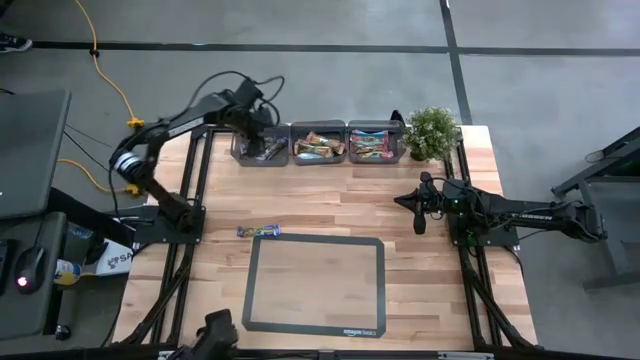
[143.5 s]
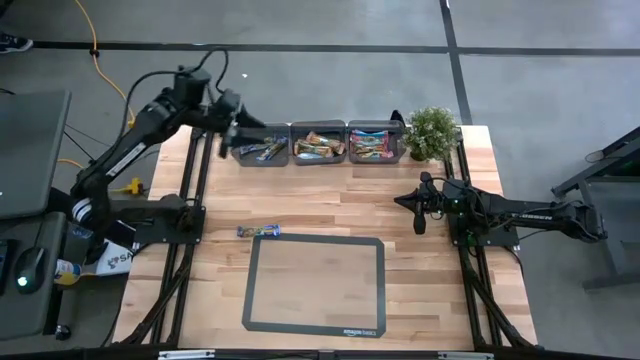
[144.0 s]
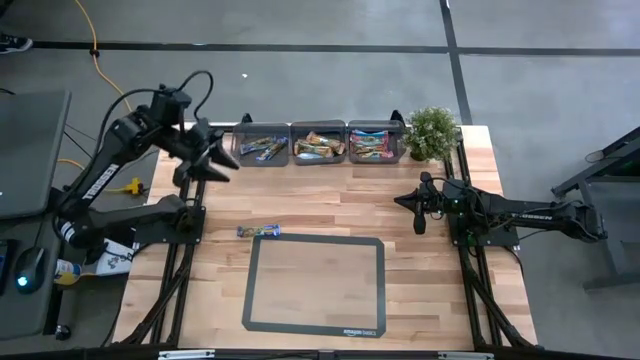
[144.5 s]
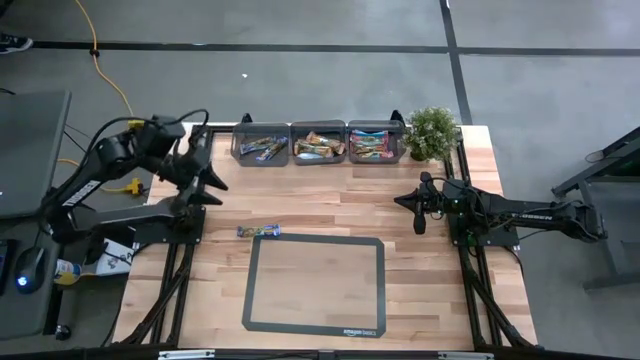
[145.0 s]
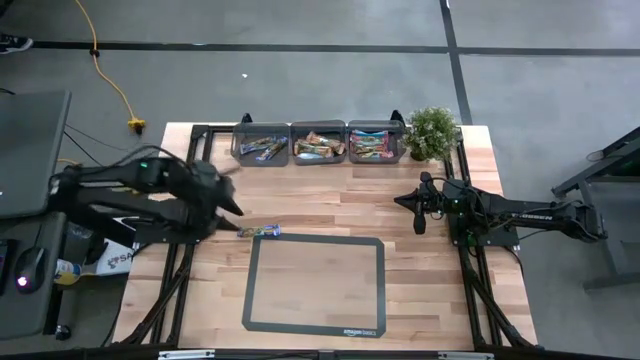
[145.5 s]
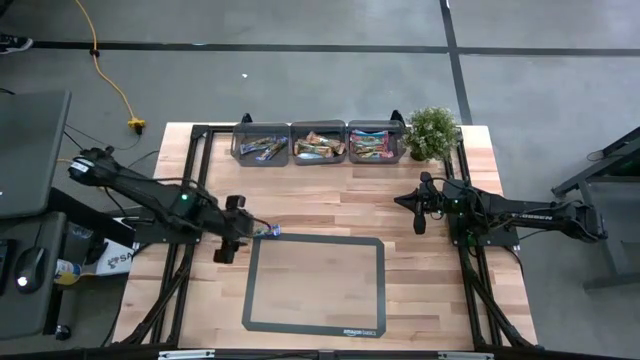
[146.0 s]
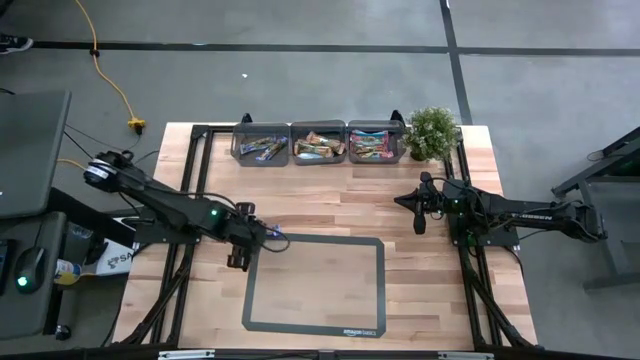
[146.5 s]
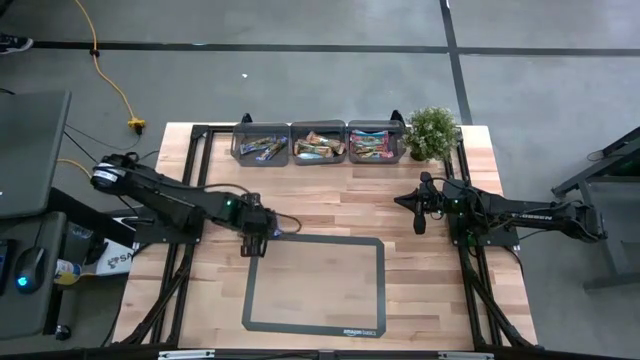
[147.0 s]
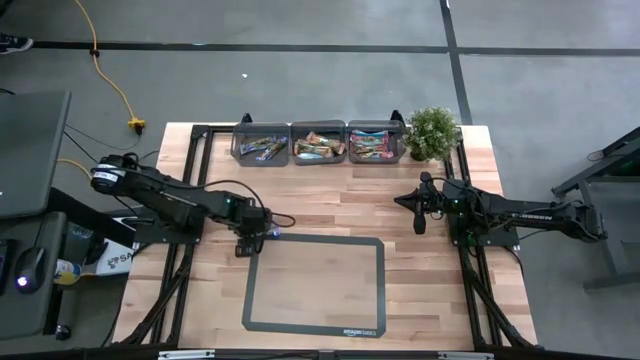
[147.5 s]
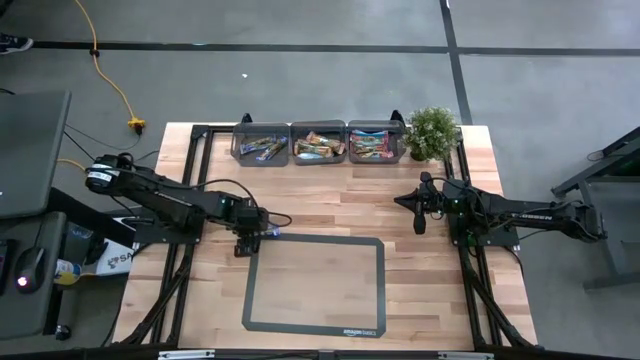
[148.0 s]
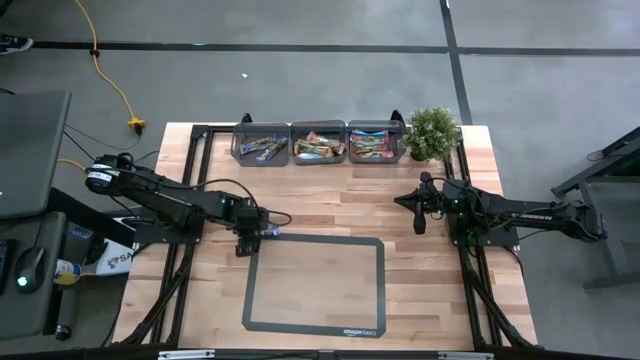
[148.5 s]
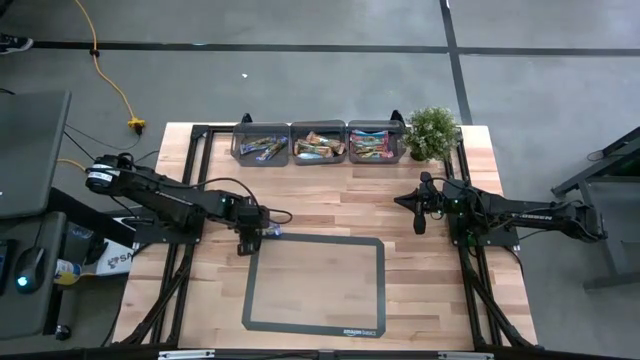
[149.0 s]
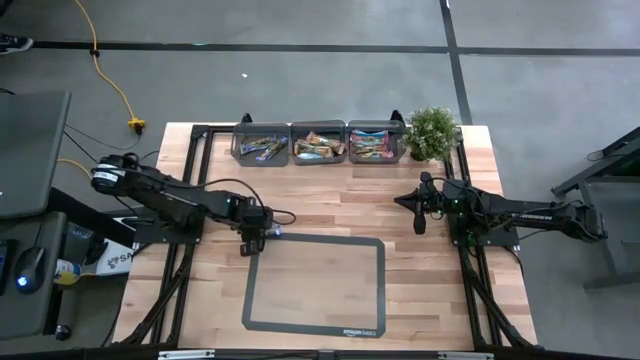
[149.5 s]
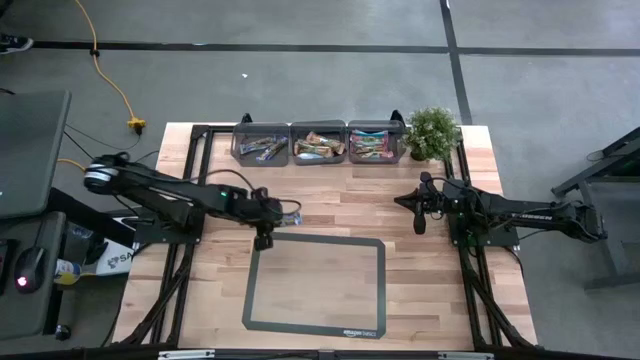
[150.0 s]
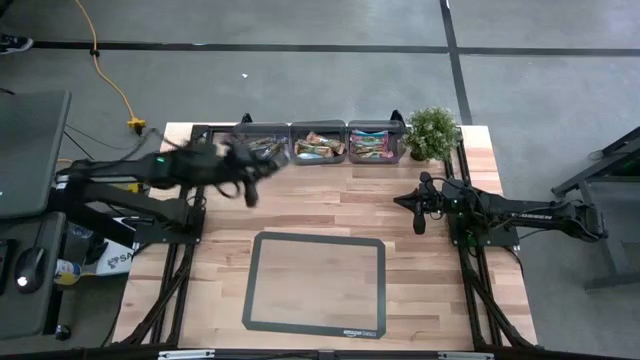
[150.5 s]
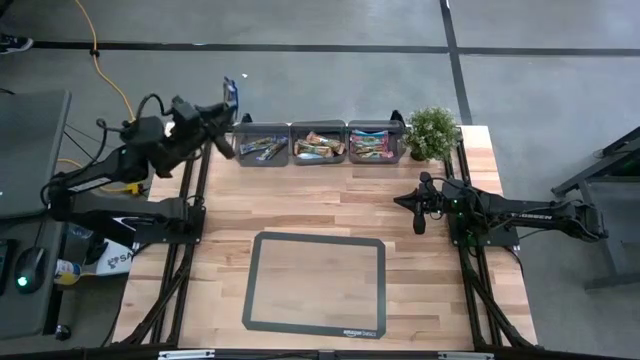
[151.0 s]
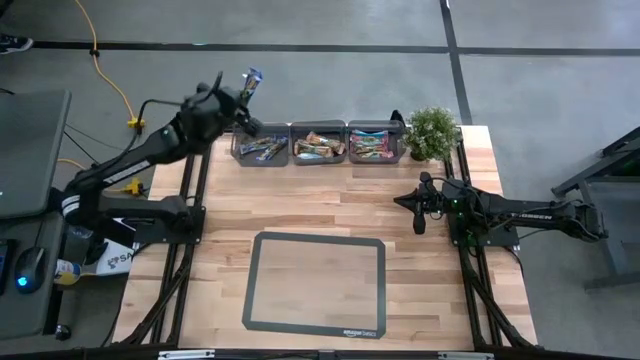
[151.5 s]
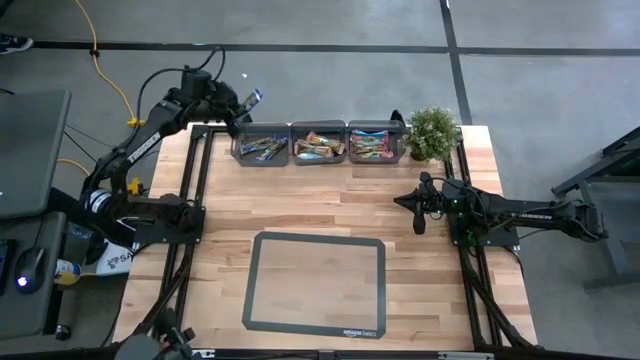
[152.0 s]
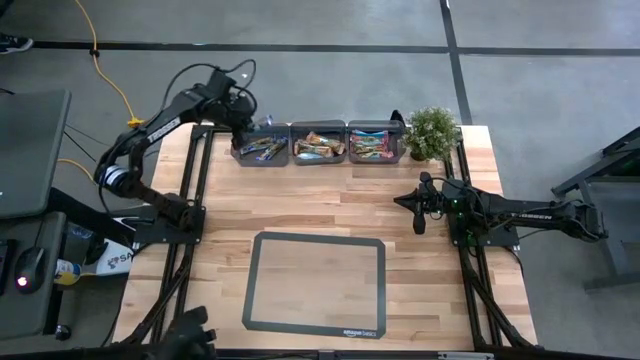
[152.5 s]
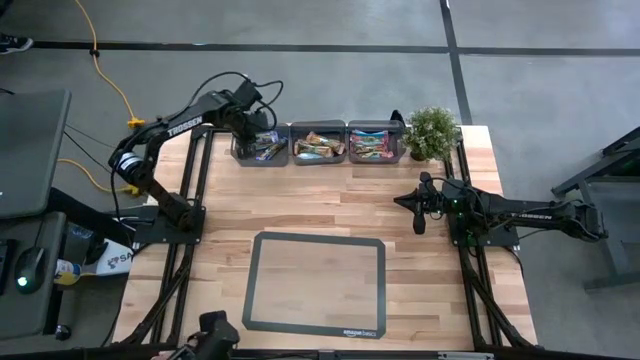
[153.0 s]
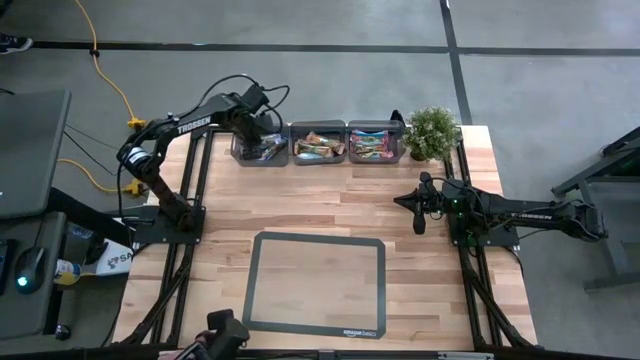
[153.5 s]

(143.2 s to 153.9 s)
Task: Pick and place Granola Bars by type
Put the blue granola bar into the left black bin

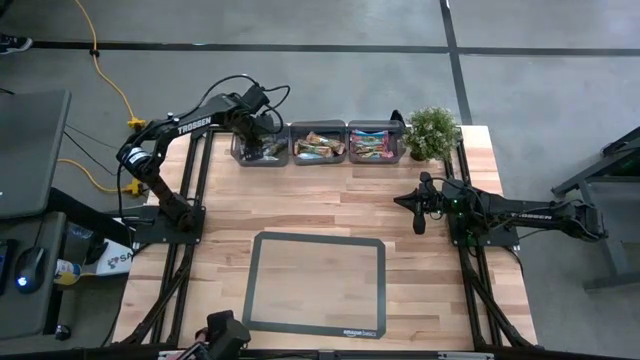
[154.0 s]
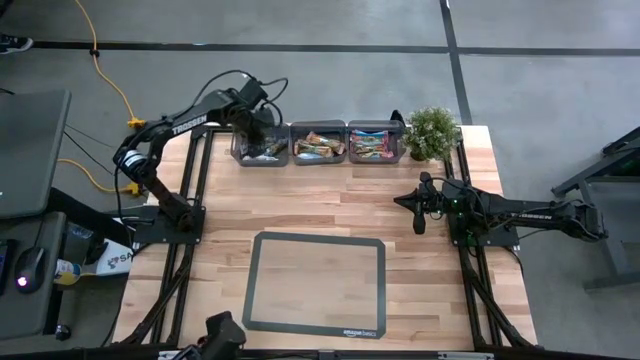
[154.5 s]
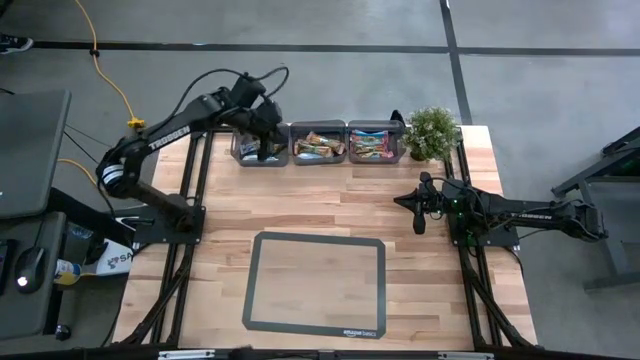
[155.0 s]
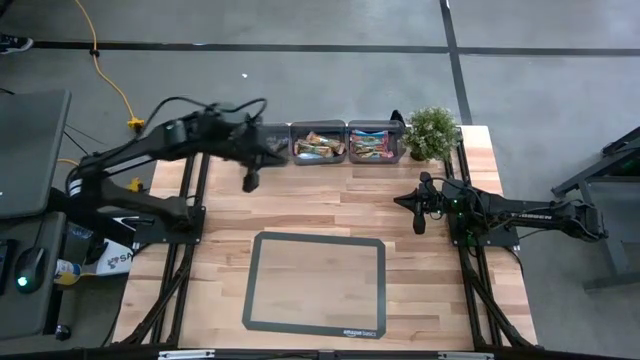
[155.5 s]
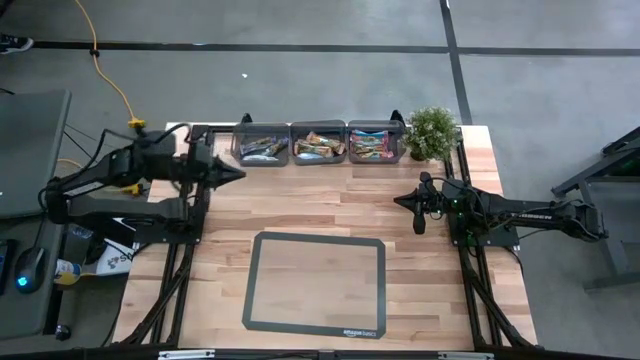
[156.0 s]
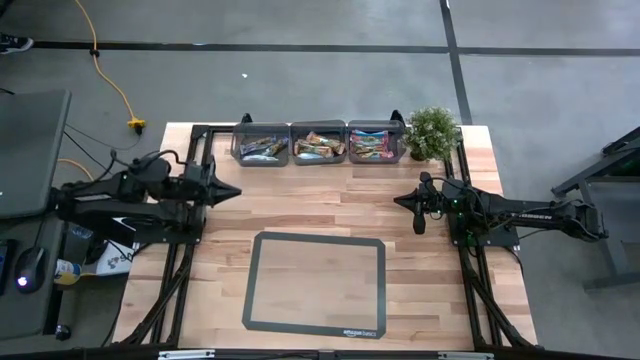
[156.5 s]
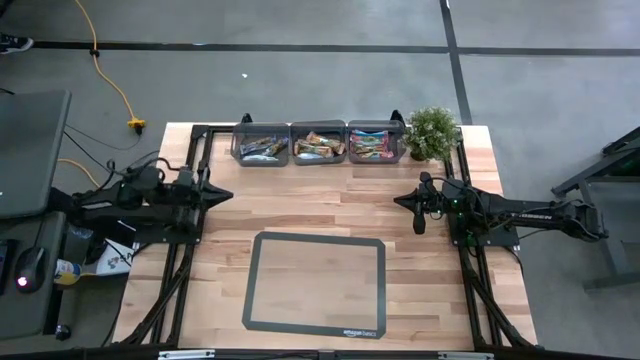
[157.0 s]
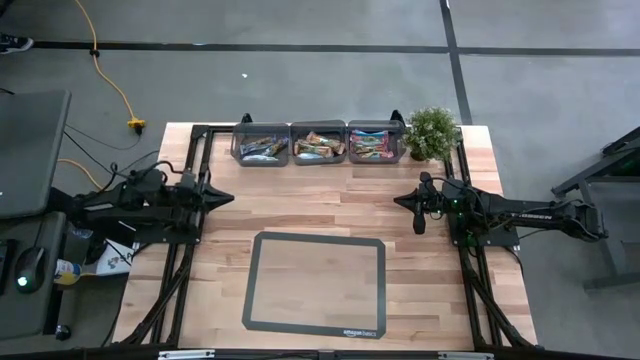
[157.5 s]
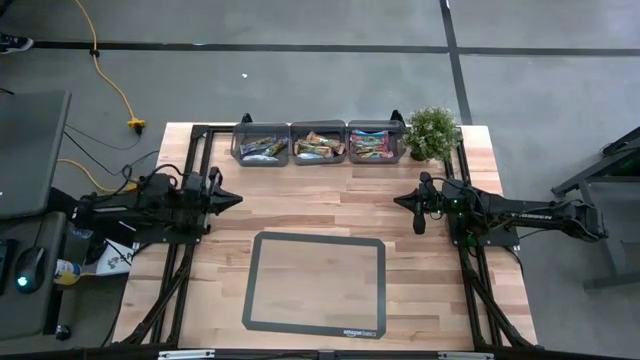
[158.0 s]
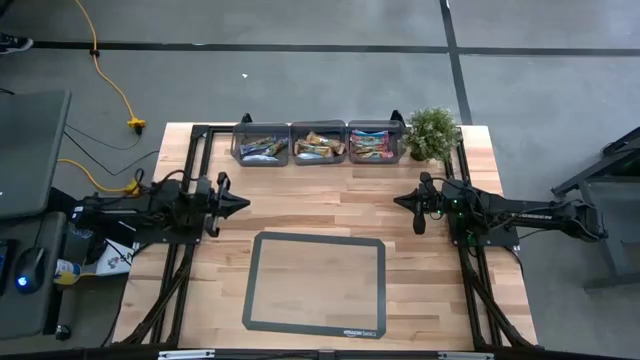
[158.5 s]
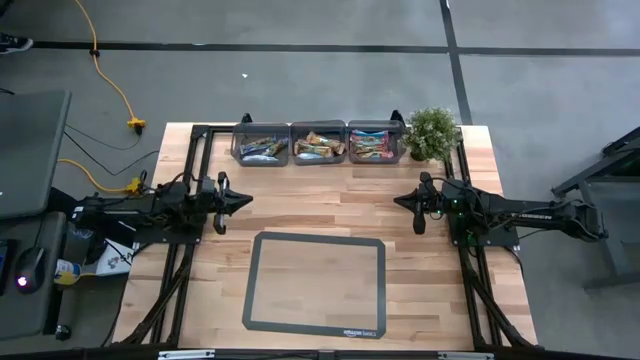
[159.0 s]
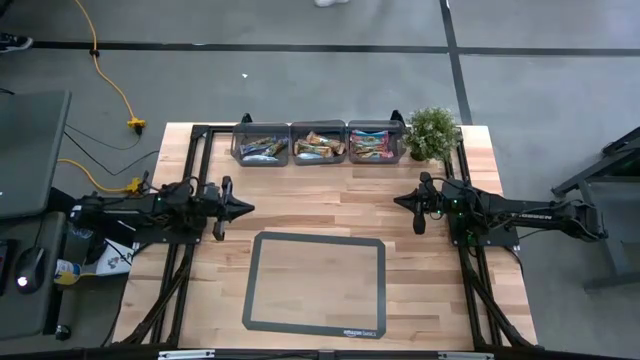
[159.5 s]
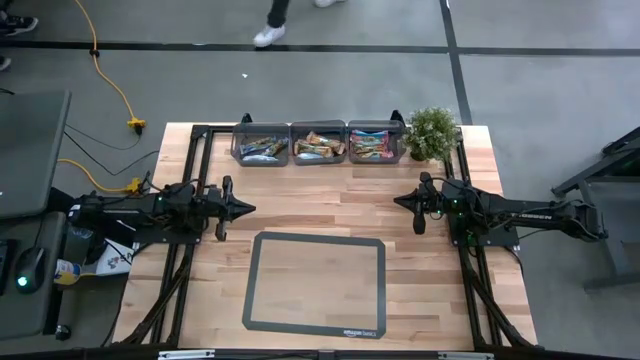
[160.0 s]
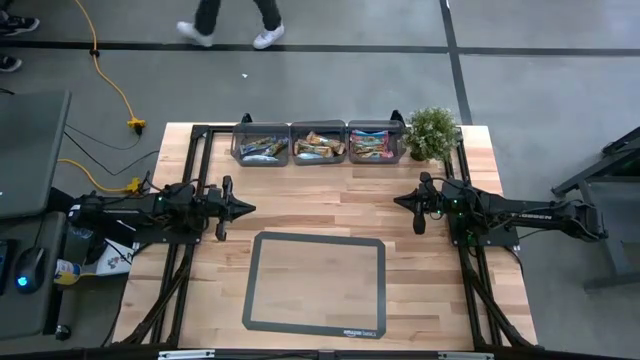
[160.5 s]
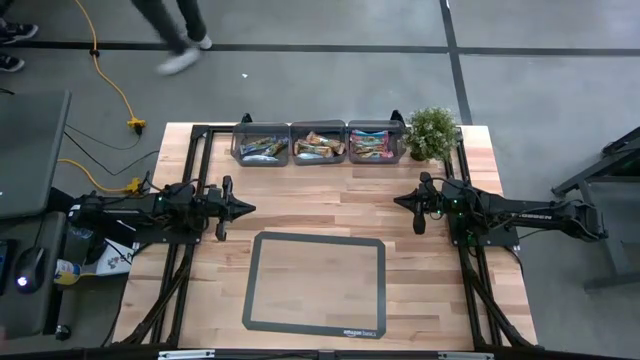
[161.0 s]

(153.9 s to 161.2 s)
Return to Home Position

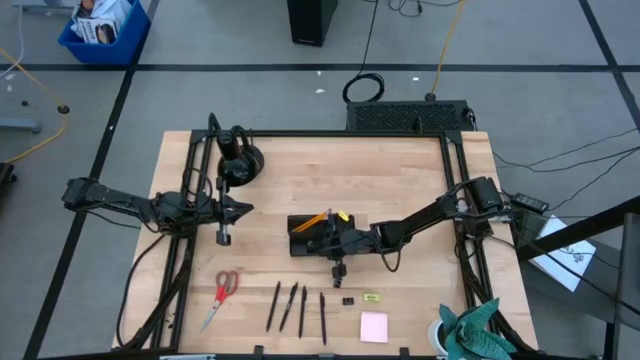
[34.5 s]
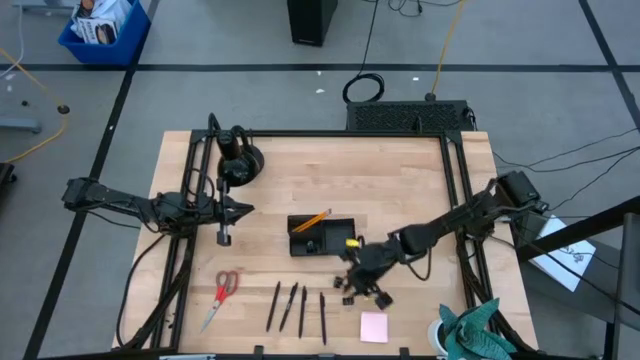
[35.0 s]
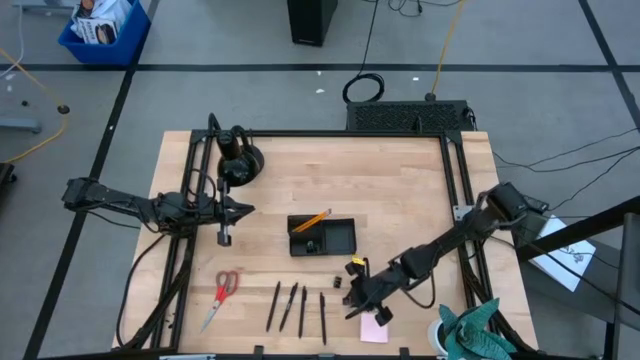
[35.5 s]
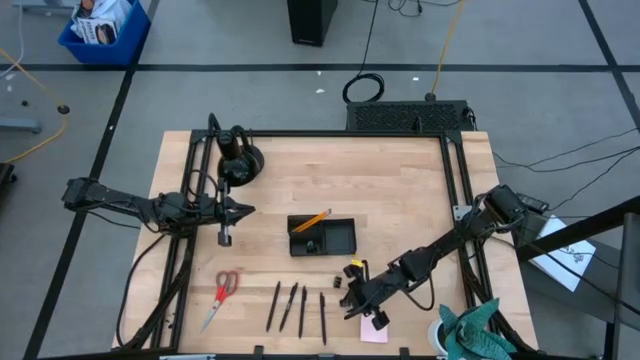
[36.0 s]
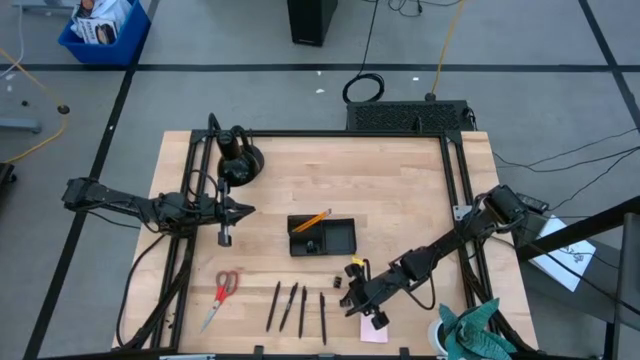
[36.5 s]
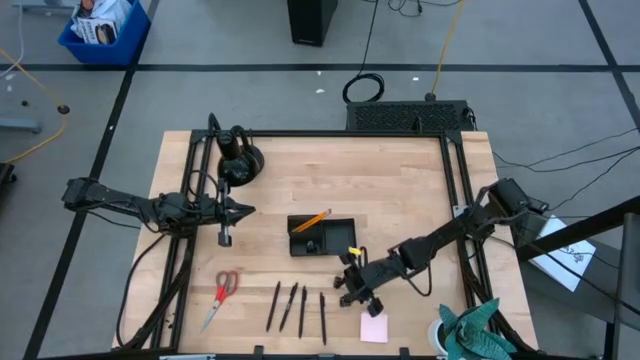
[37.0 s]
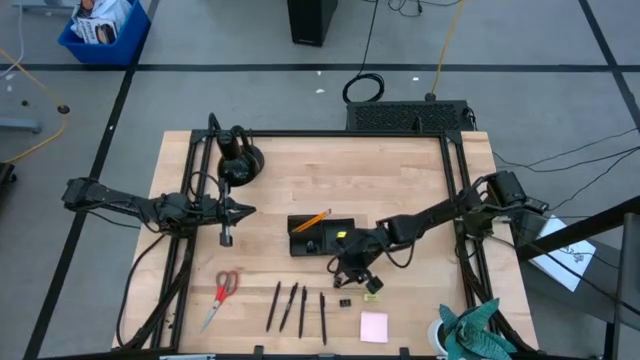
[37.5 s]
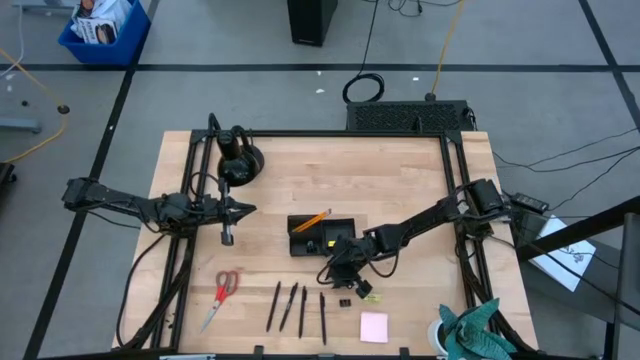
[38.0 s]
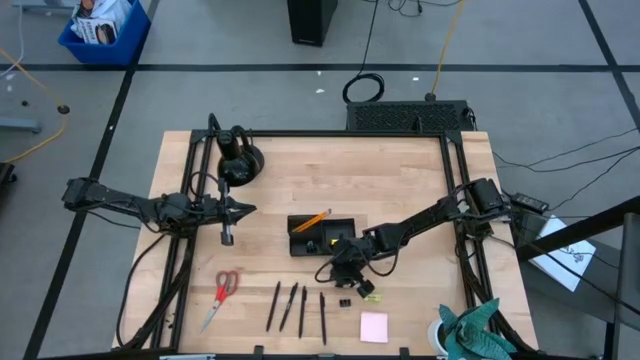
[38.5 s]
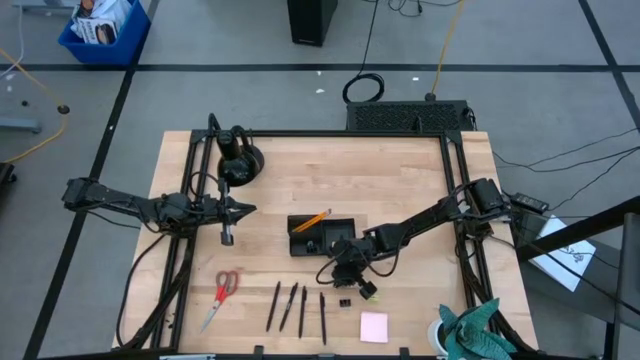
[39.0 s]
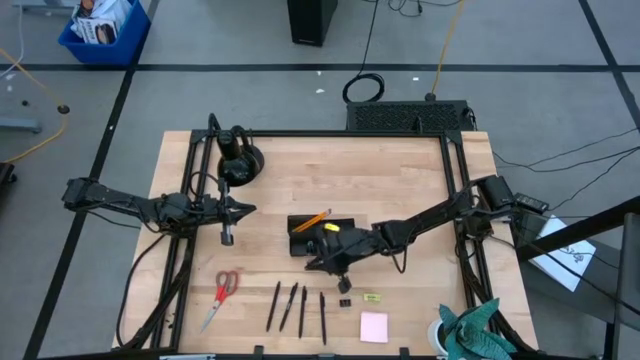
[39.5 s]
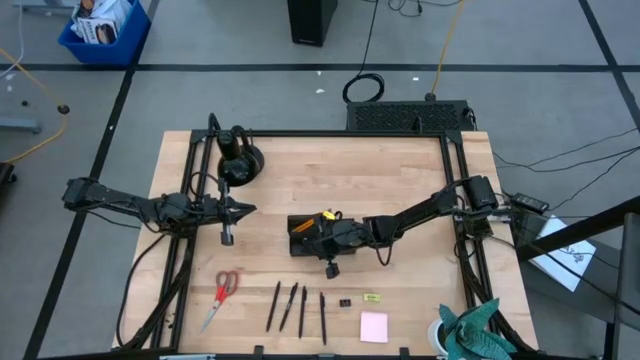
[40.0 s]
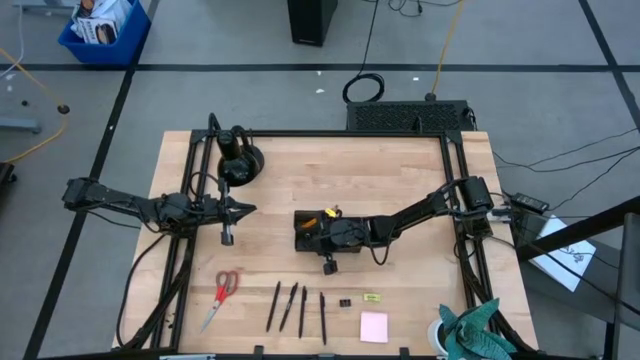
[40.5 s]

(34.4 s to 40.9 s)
Task: Pick and place office supplies into organizer
Put the black binder clip into the black desk organizer
